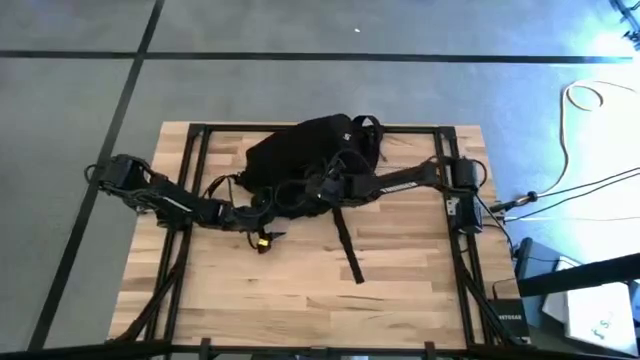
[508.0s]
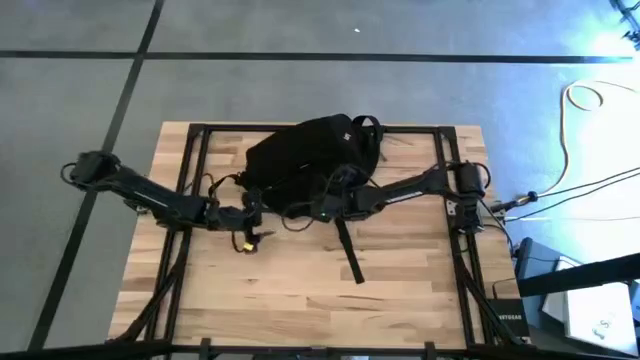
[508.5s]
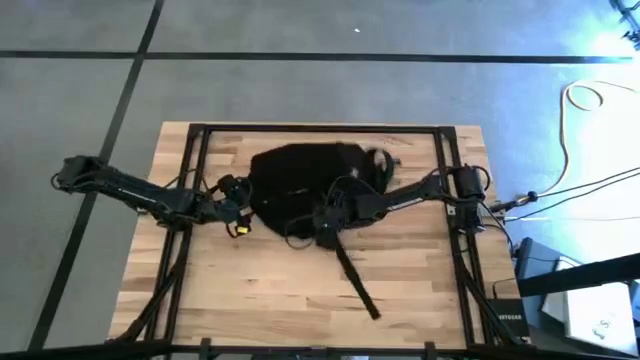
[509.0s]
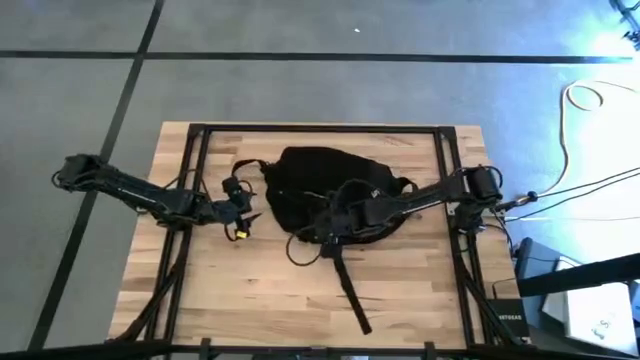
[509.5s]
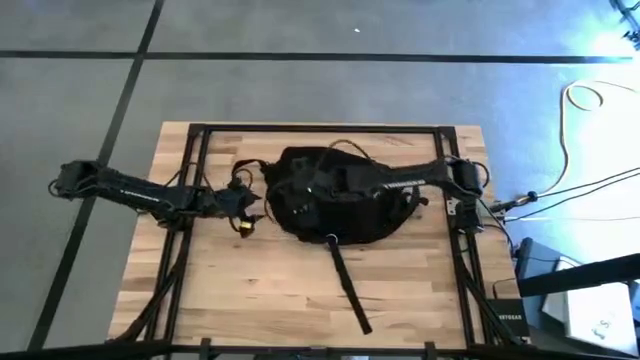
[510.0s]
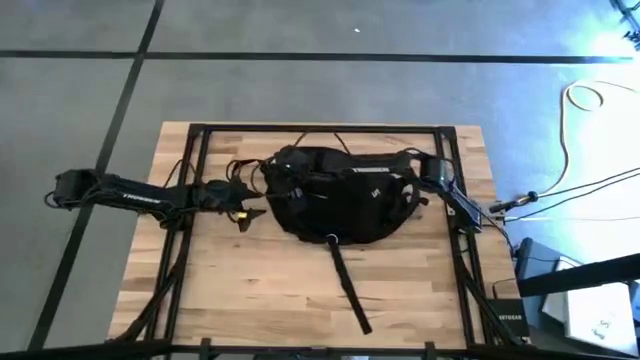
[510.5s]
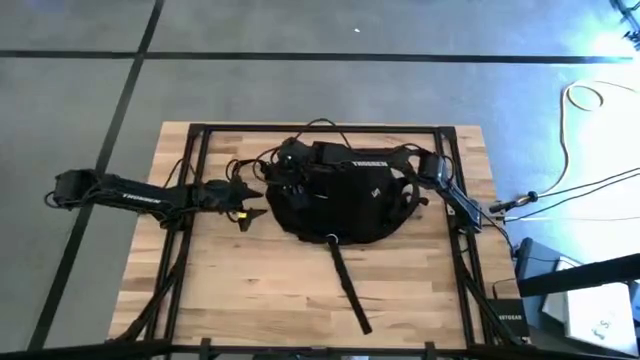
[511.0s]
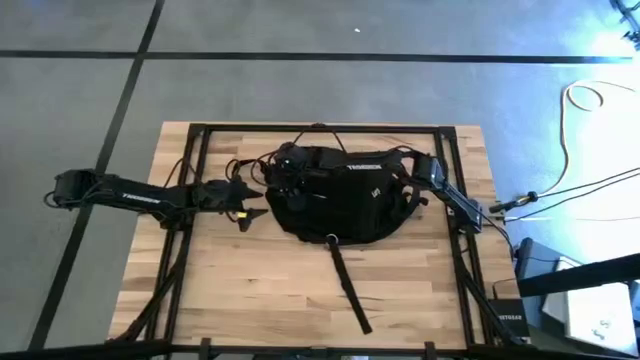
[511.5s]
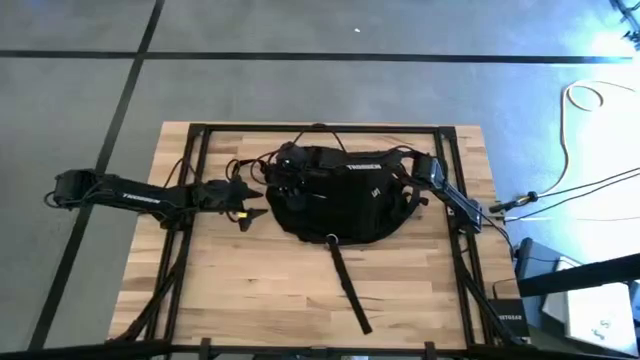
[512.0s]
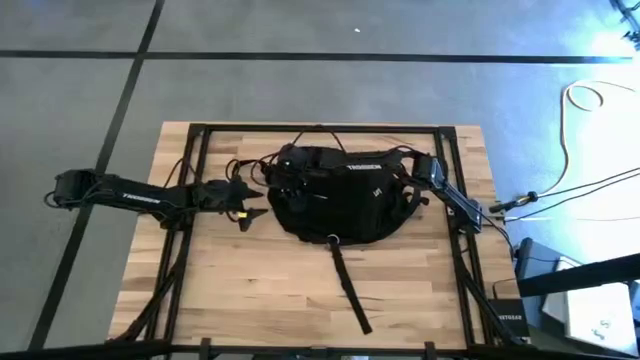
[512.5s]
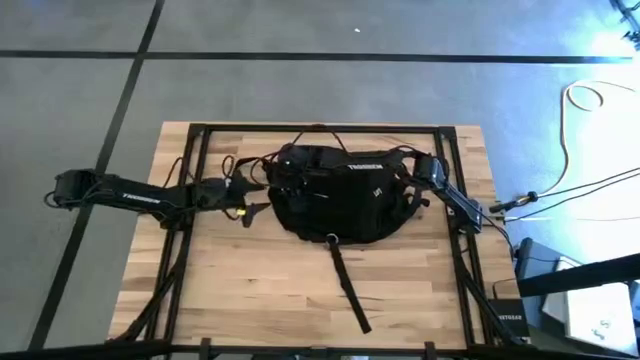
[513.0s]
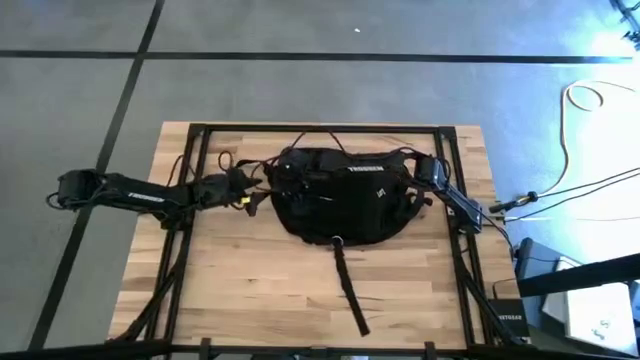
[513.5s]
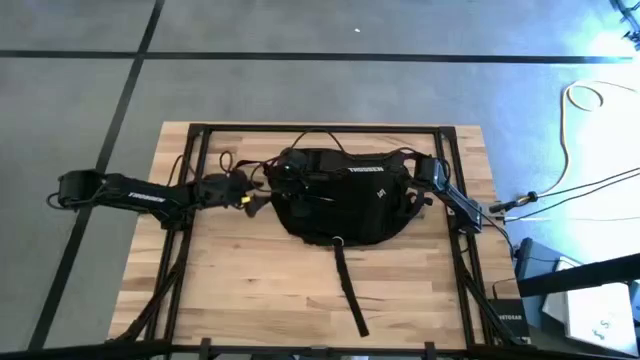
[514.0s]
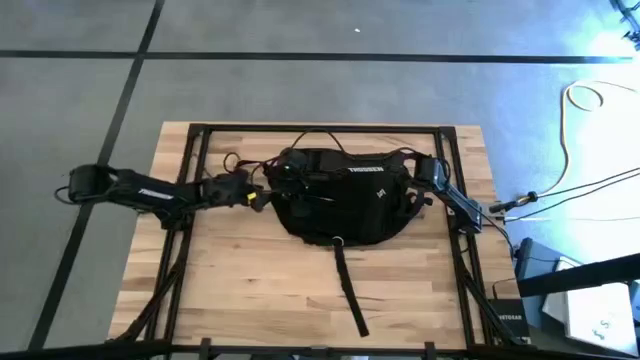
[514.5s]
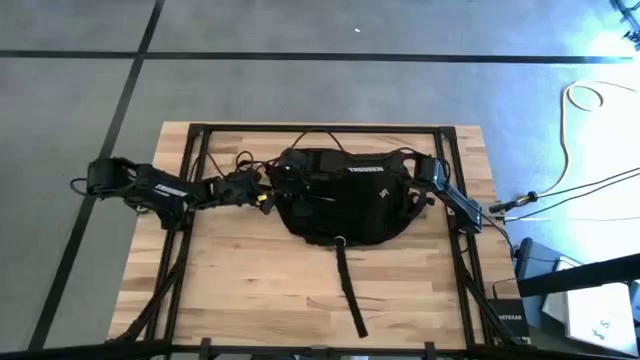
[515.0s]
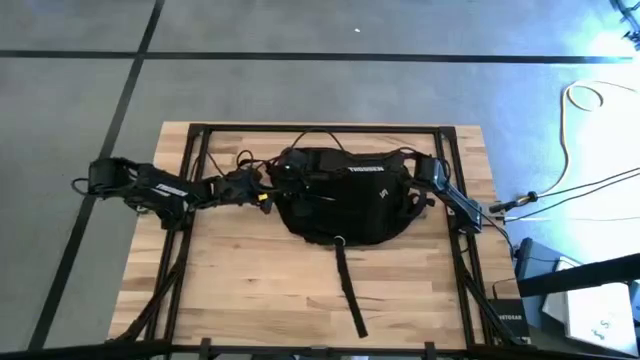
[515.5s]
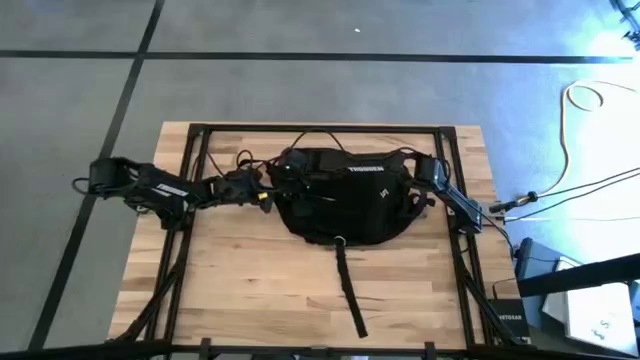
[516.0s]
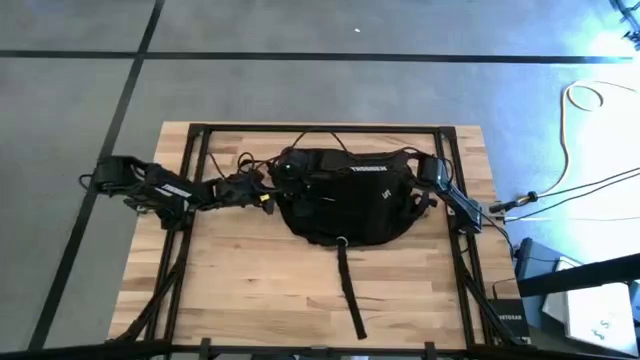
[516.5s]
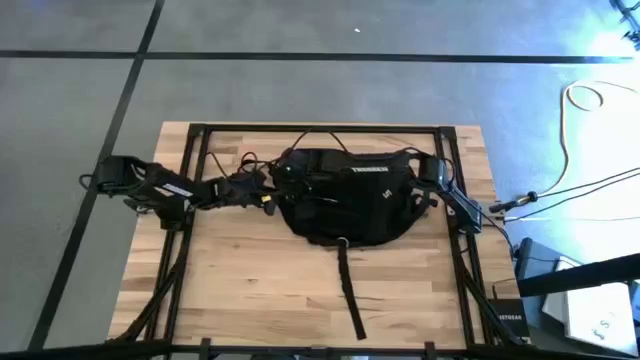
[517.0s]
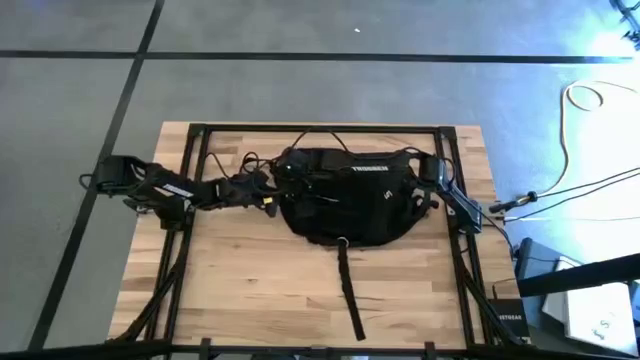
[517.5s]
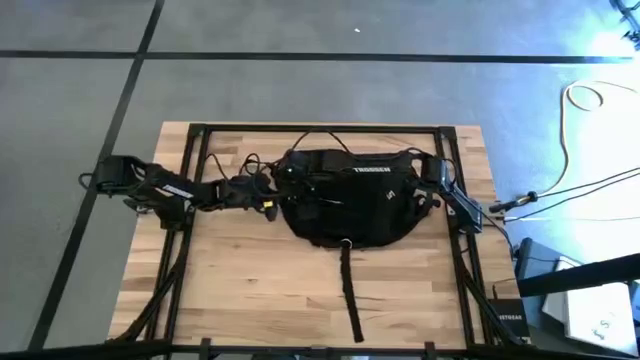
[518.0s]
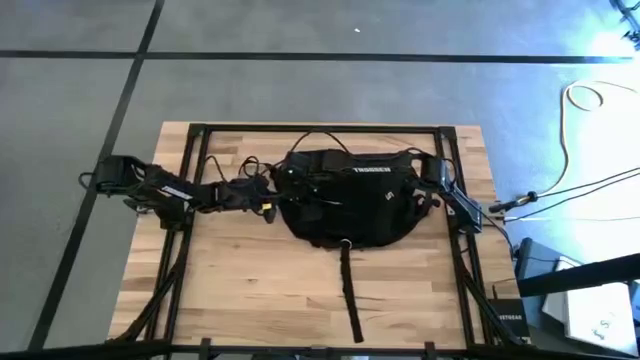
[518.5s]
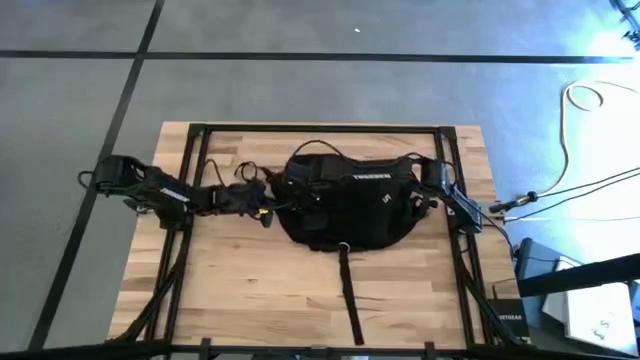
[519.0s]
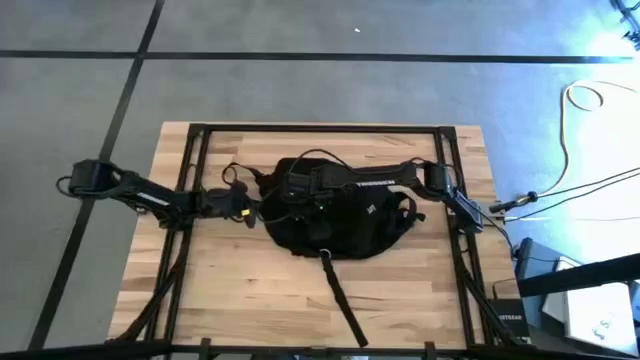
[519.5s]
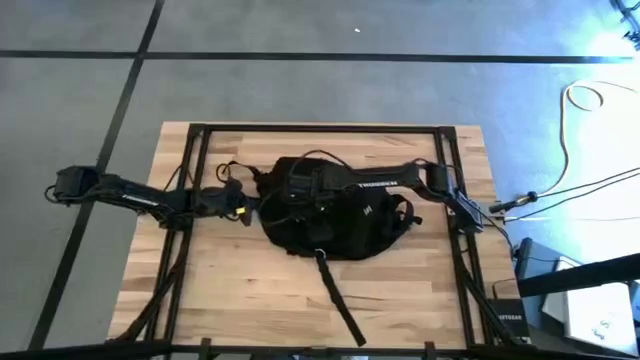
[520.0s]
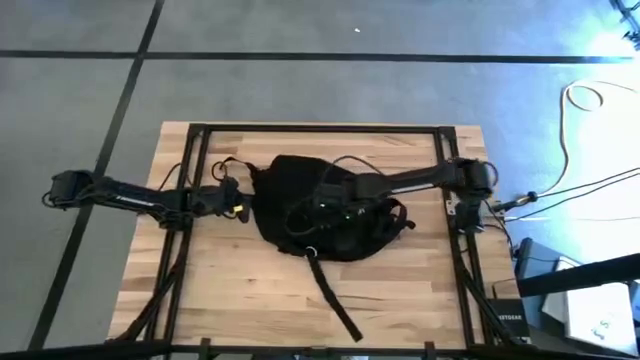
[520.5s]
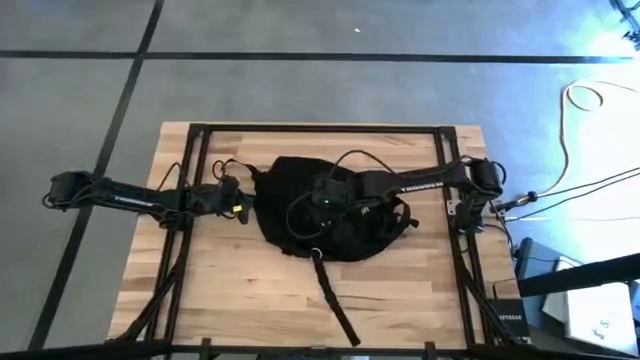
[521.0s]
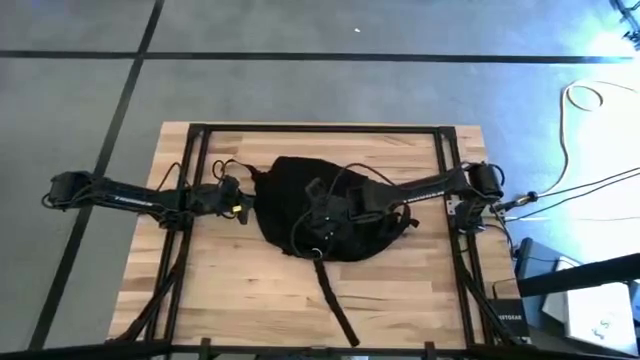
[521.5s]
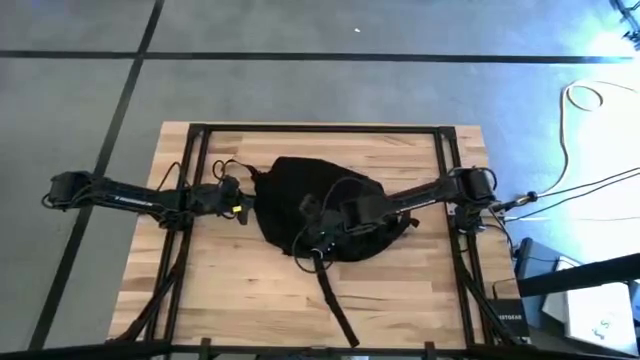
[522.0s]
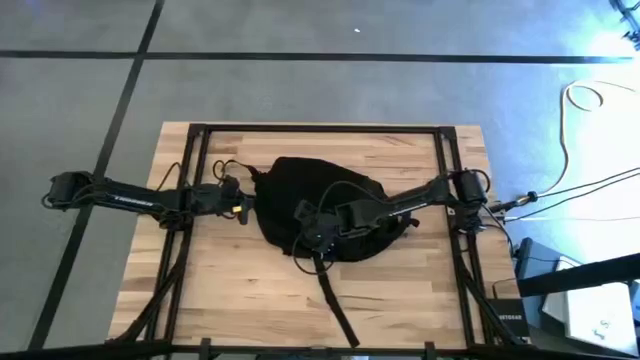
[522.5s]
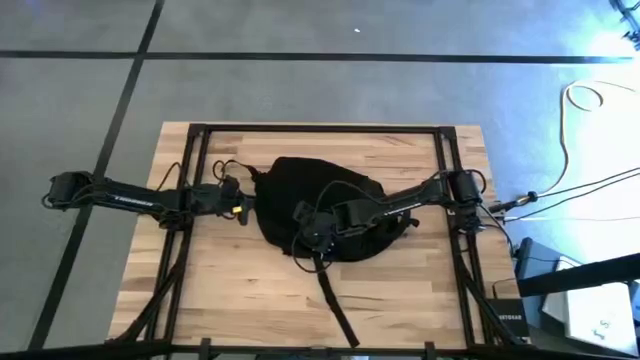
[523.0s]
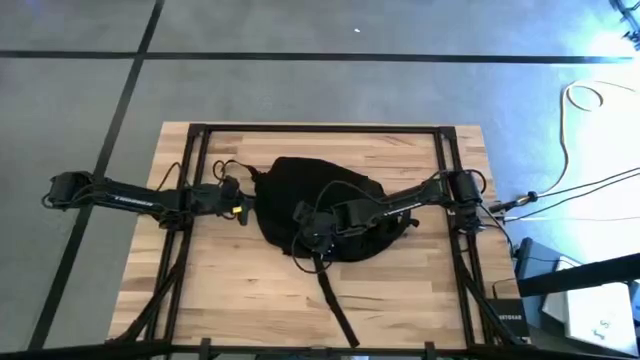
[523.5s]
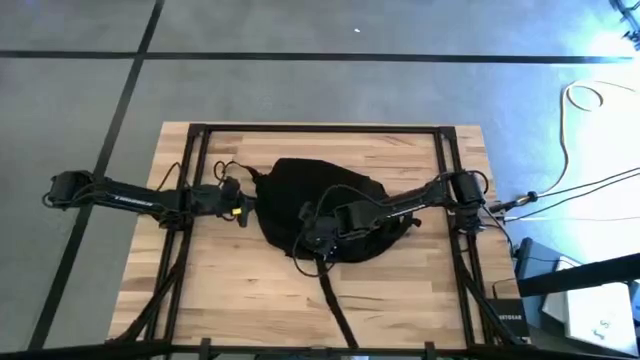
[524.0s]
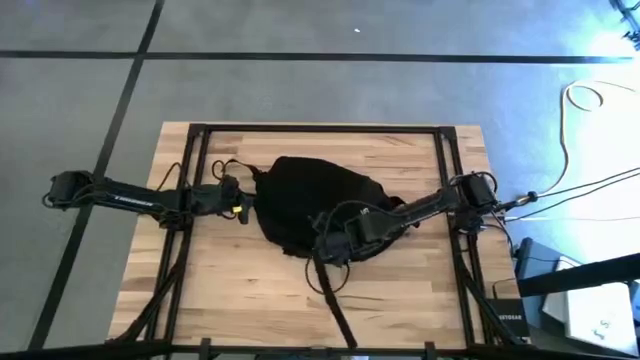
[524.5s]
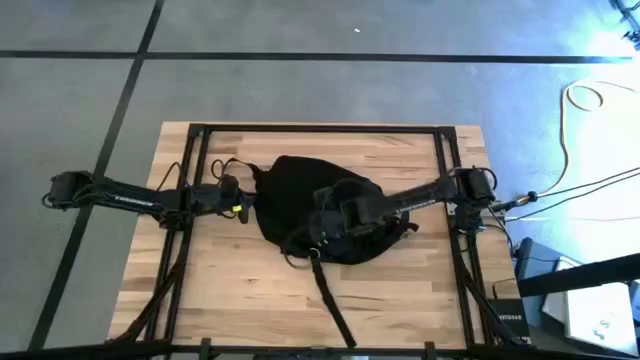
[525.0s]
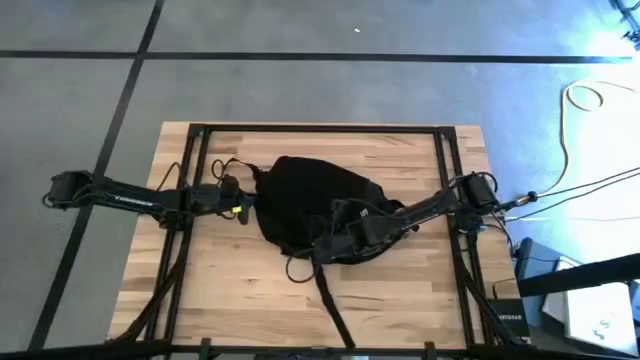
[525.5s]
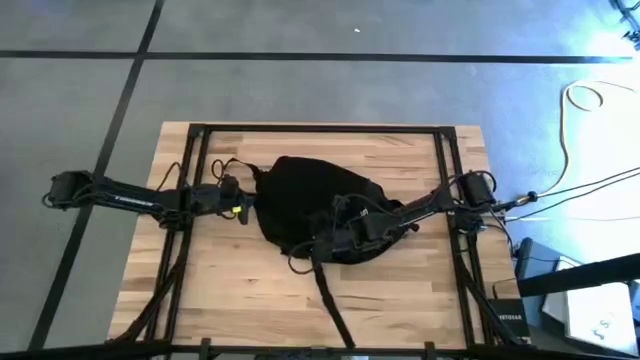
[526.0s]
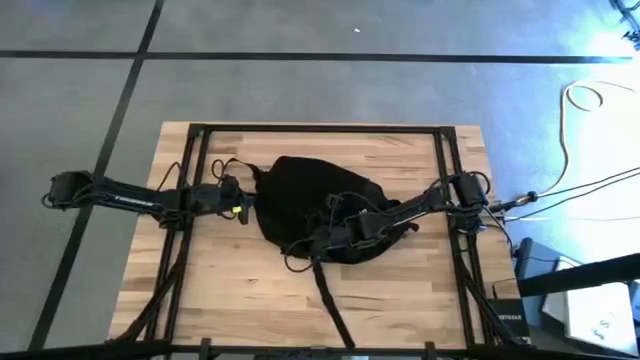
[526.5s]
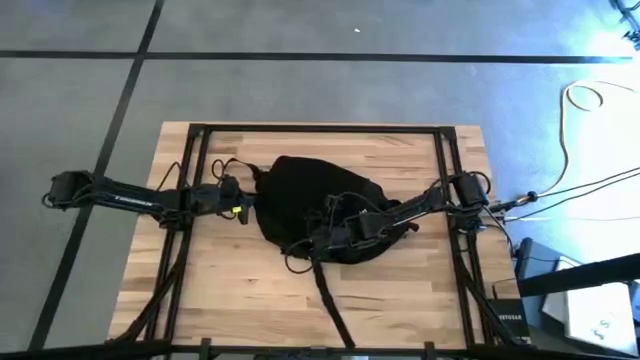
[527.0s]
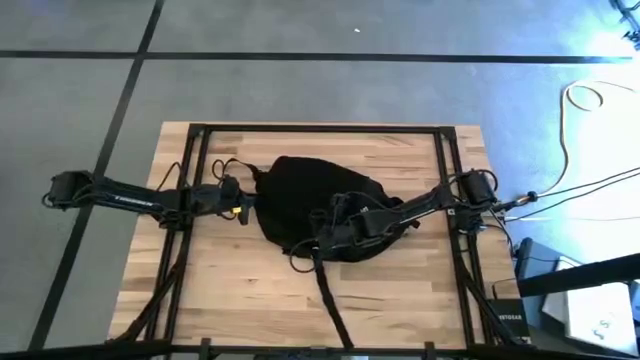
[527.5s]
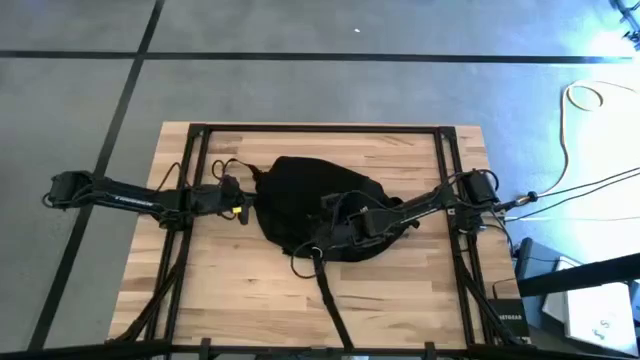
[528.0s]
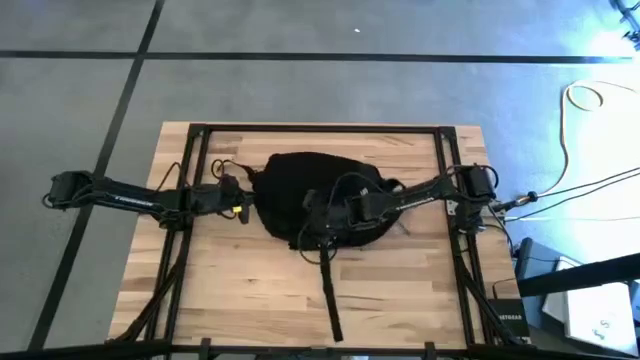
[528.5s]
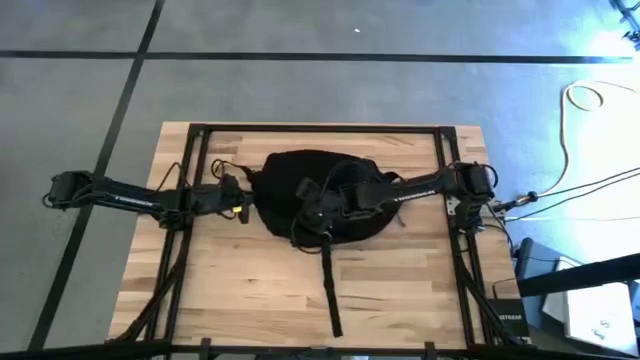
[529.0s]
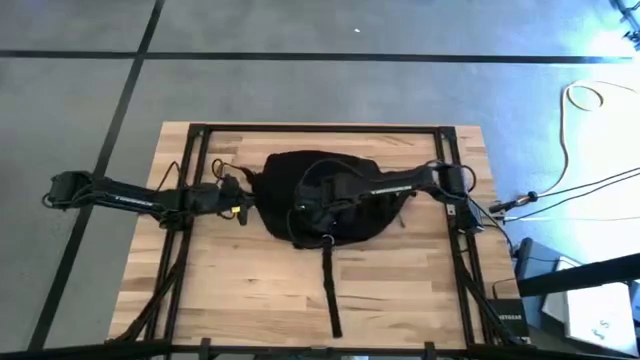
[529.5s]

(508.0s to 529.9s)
Task: Unpack backpack
Close the black bag
